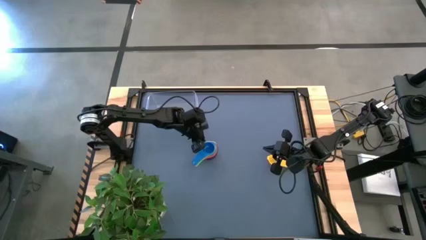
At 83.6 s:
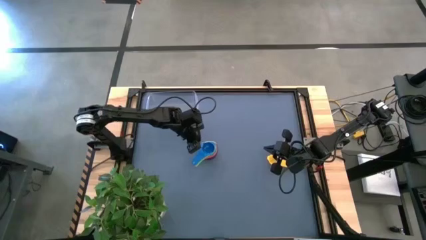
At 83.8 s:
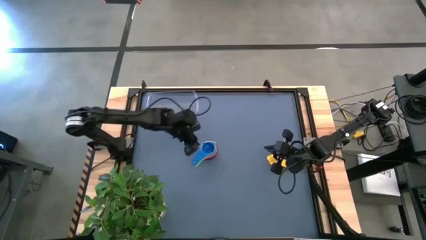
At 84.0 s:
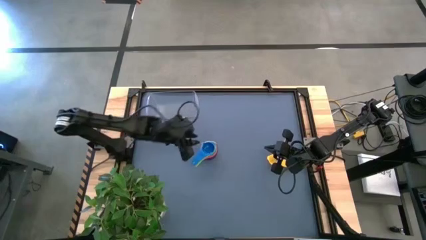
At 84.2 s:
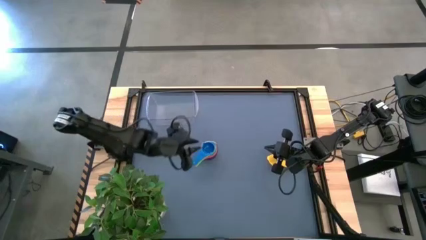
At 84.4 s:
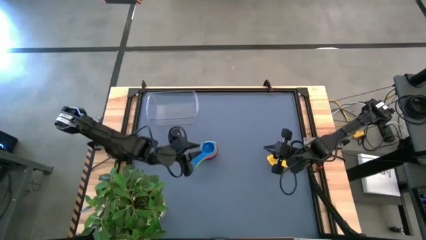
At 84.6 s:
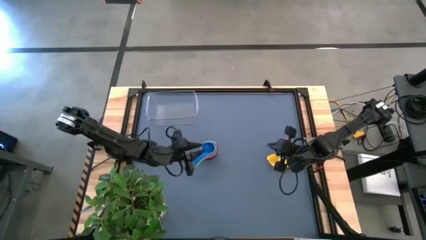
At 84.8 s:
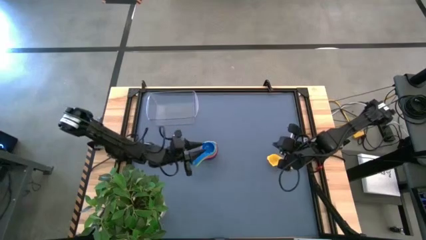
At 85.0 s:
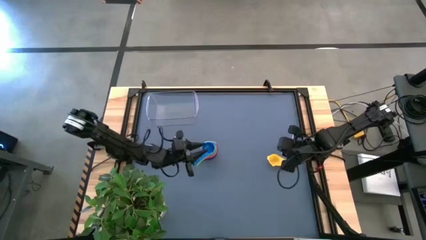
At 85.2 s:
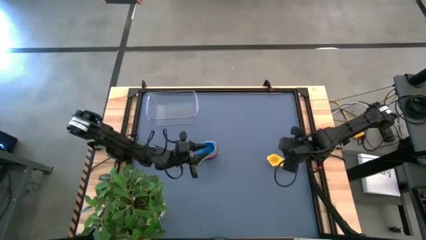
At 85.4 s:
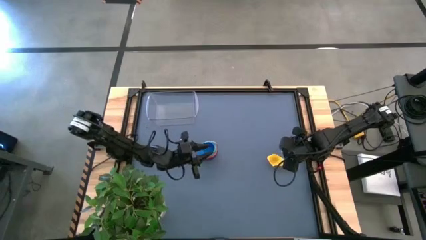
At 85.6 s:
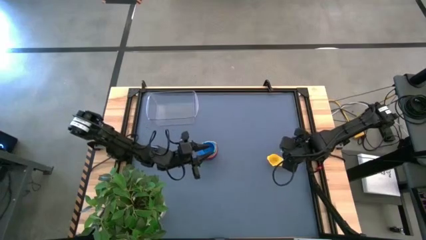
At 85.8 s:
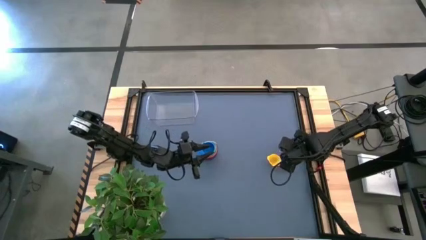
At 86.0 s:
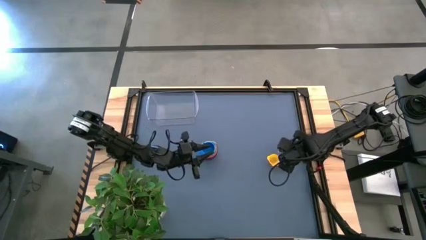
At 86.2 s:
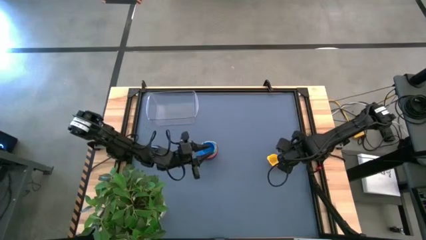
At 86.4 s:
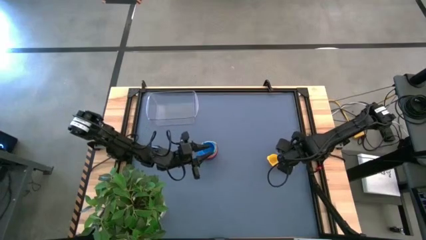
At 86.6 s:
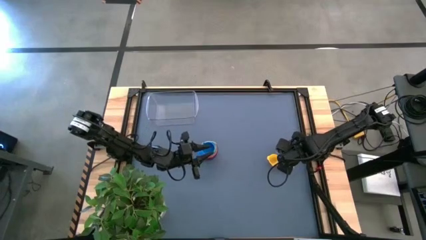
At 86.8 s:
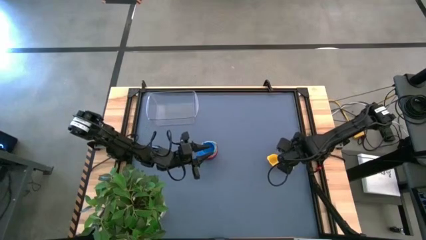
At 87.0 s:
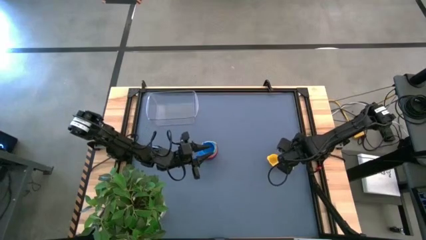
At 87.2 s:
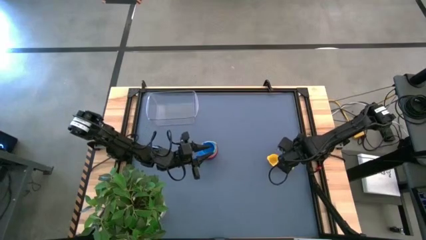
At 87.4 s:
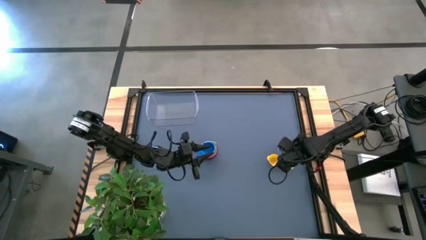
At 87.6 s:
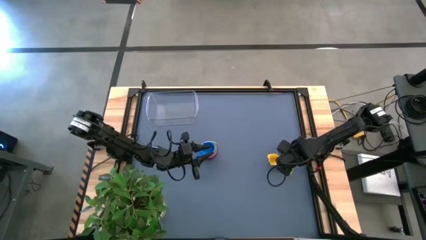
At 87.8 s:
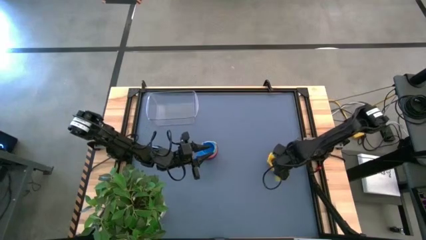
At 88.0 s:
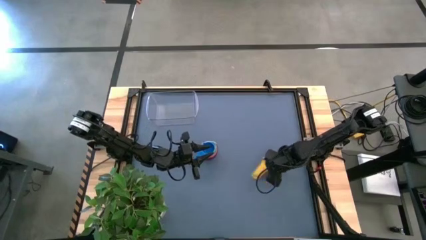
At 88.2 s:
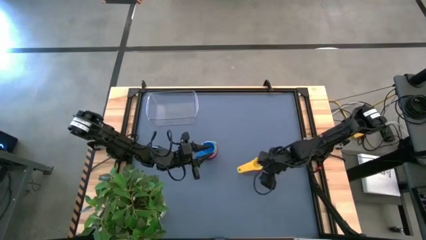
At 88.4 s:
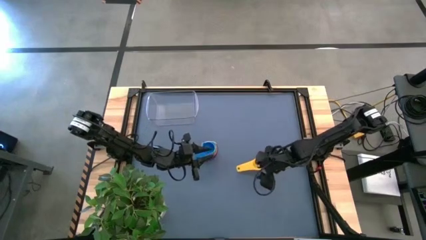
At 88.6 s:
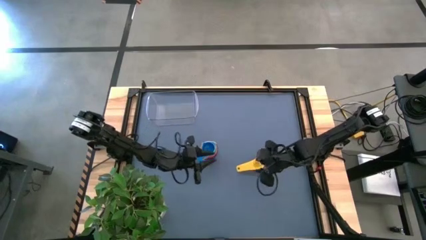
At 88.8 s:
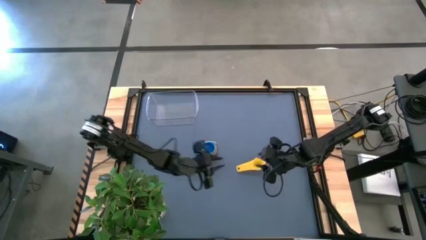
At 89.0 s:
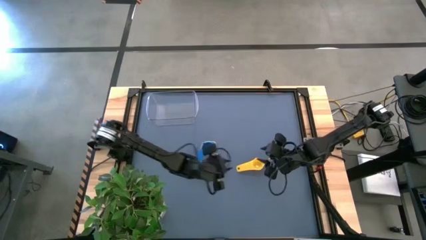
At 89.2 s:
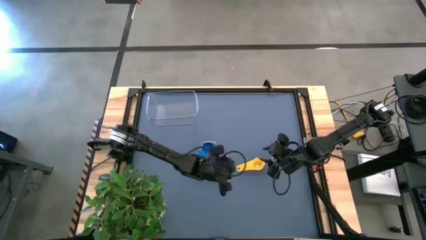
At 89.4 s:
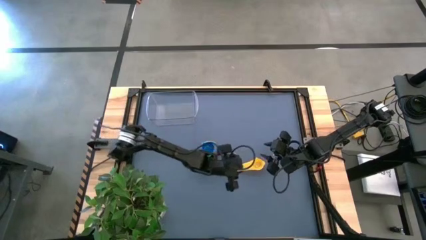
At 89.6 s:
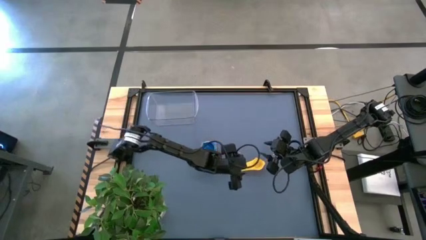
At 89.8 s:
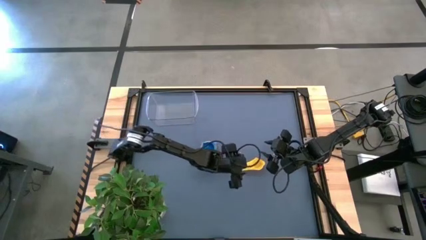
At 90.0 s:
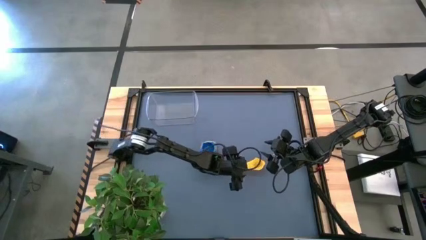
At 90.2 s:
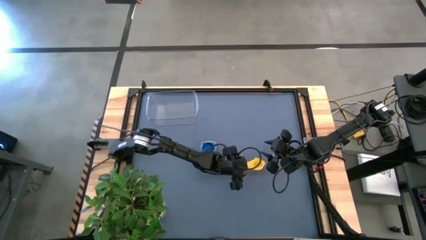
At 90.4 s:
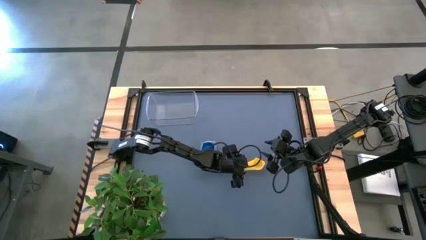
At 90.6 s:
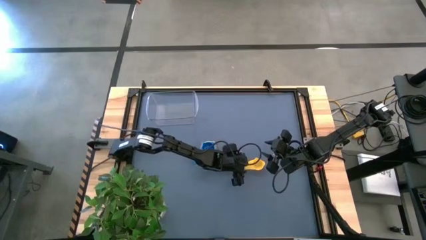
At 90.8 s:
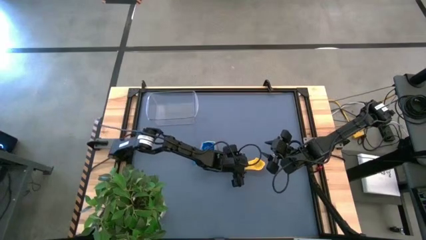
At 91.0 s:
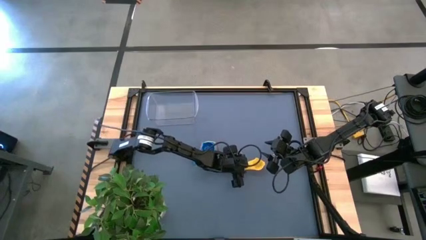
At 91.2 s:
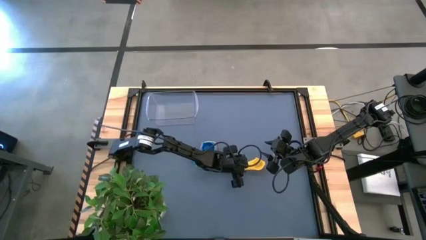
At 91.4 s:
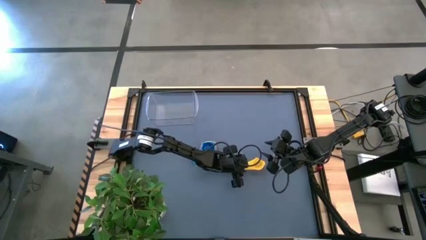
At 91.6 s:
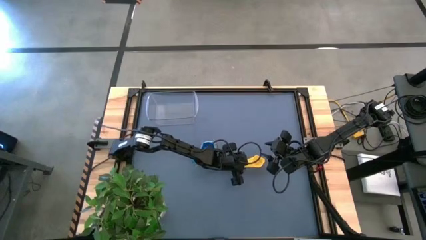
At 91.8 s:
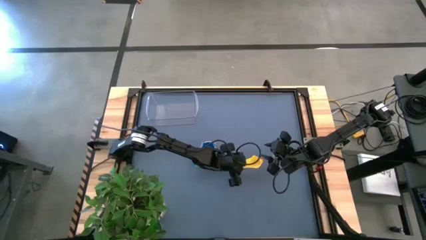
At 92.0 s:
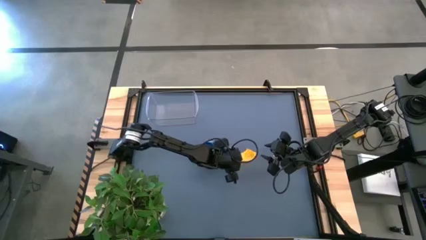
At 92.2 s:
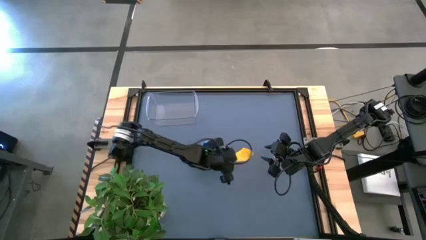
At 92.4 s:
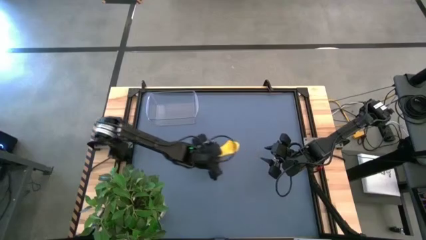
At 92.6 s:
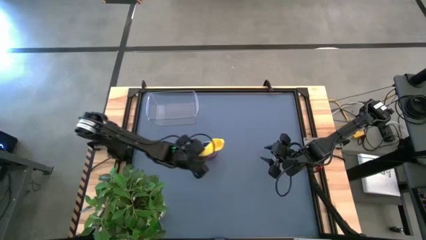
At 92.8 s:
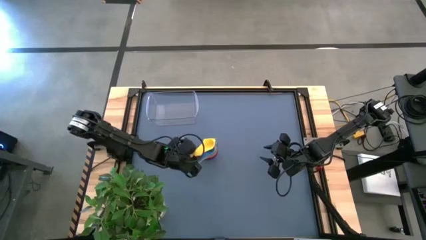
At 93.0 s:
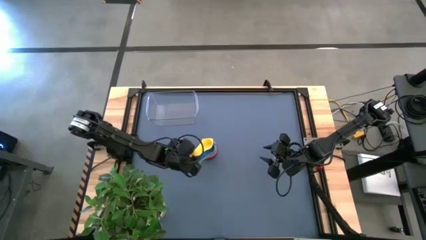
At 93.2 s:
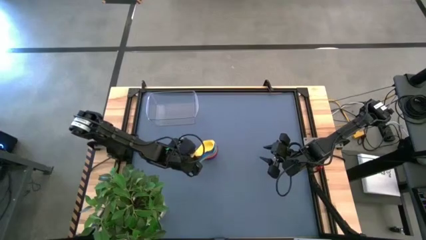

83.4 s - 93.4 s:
Task: Nest measuring cups in basket
Stack the yellow measuring cup on top of the blue measuring cup

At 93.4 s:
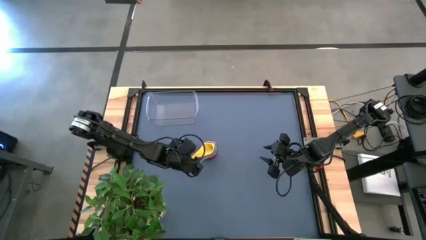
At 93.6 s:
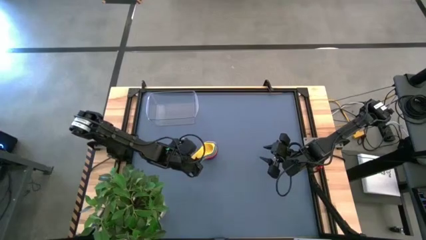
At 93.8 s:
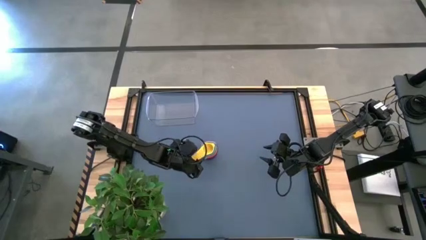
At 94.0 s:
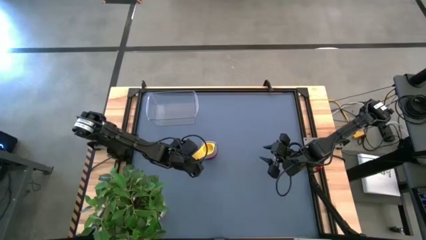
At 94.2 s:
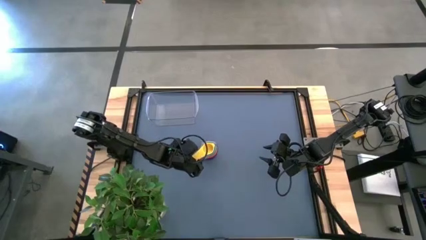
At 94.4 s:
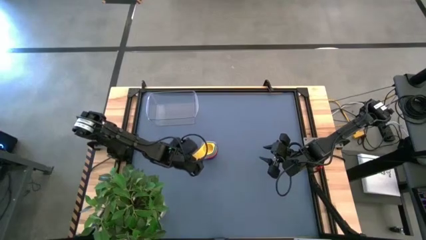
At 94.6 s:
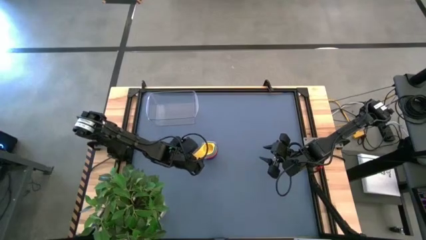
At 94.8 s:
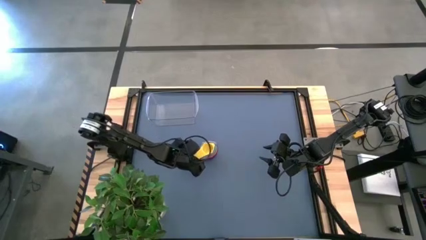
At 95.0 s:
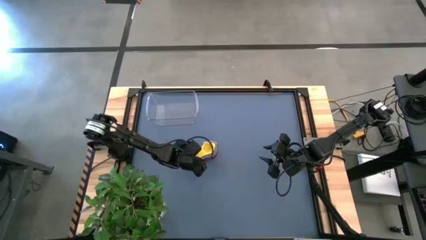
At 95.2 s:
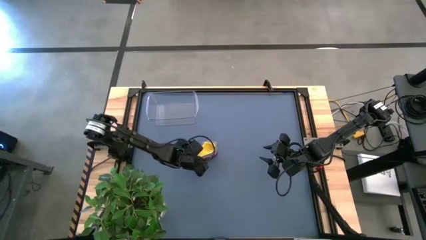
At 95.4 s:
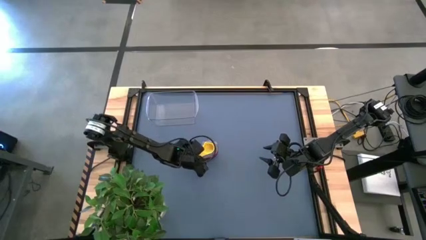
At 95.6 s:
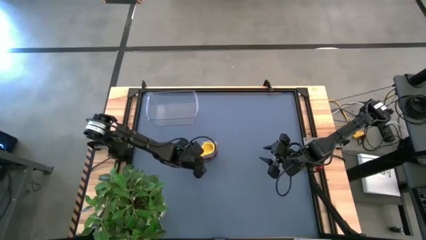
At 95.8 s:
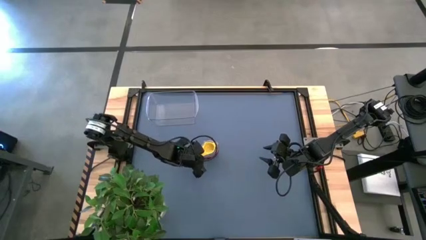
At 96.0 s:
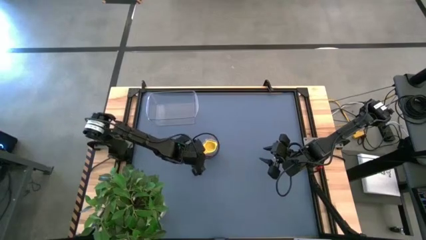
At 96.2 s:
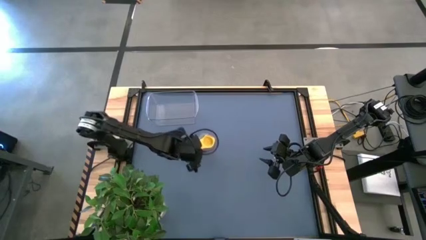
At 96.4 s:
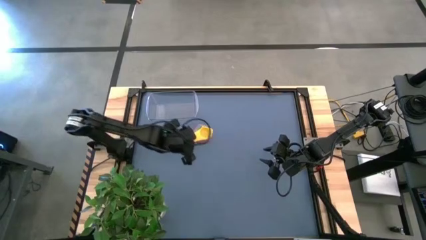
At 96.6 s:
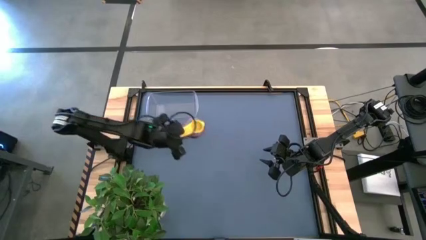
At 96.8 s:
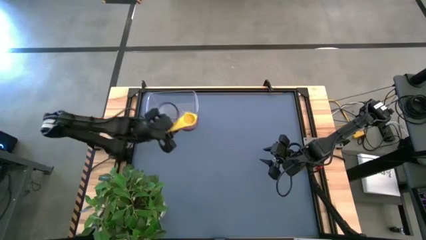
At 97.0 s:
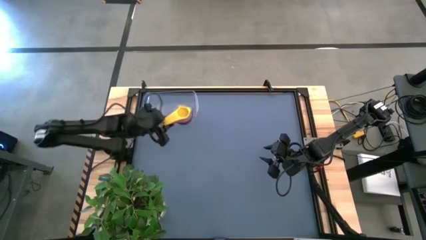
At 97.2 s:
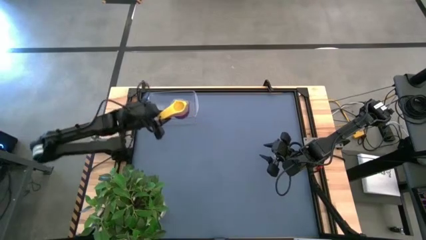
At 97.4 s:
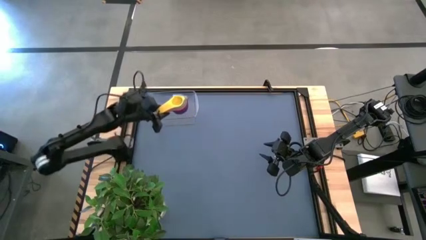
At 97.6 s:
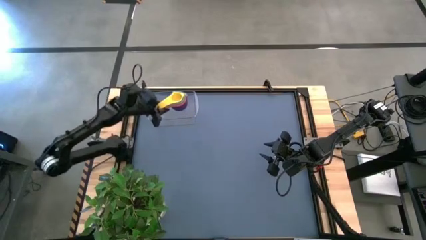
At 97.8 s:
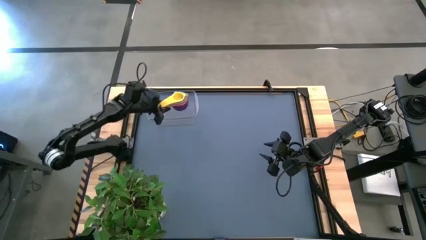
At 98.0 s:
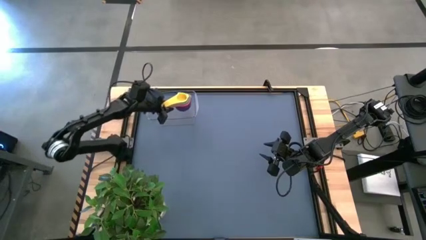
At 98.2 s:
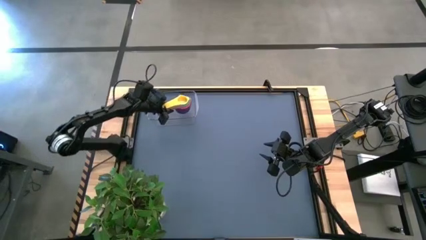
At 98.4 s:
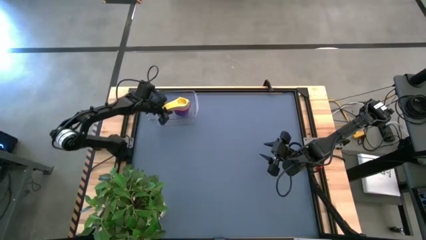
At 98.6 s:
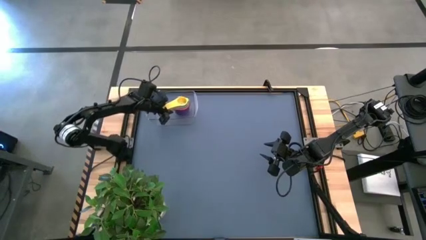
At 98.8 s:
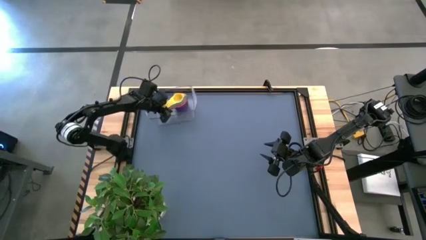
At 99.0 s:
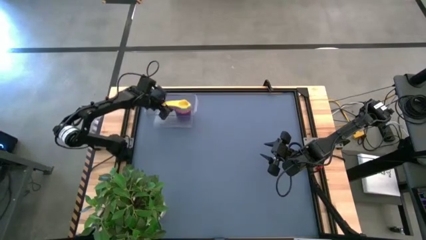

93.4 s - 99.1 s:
Put the nested measuring cup into the transparent bin
